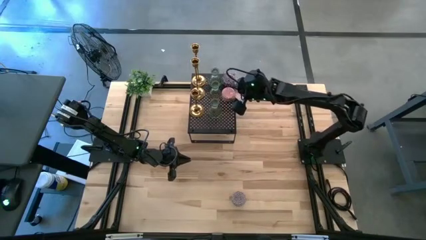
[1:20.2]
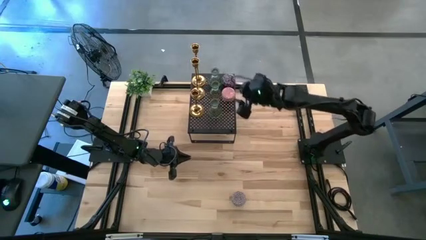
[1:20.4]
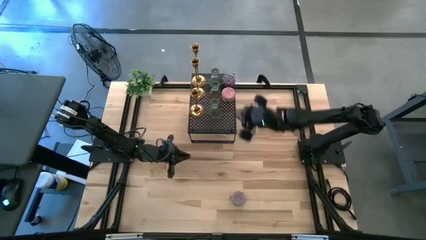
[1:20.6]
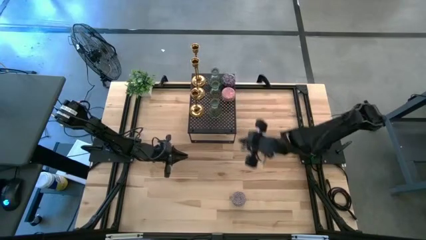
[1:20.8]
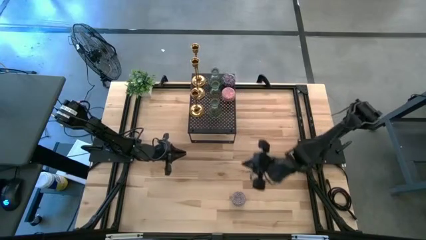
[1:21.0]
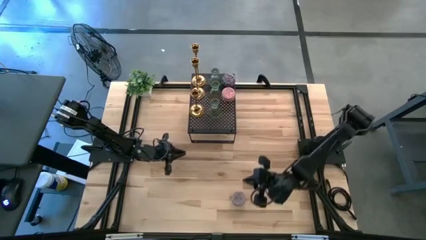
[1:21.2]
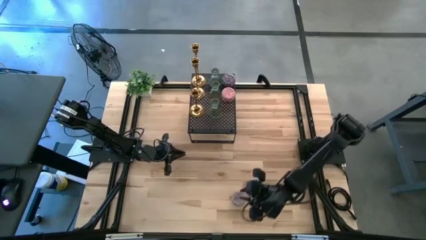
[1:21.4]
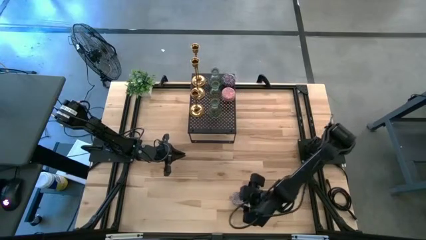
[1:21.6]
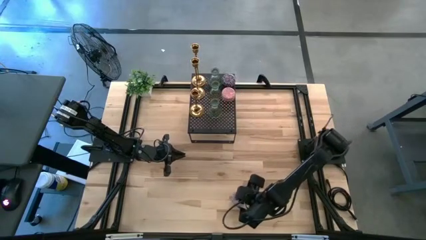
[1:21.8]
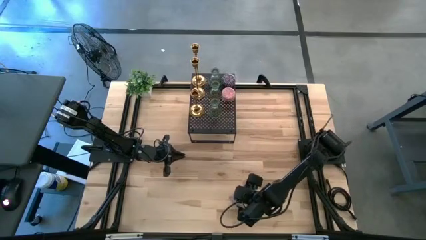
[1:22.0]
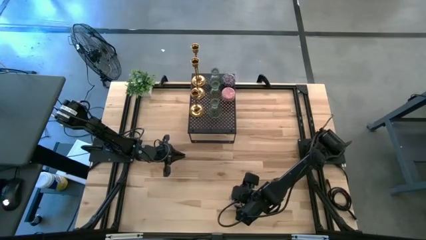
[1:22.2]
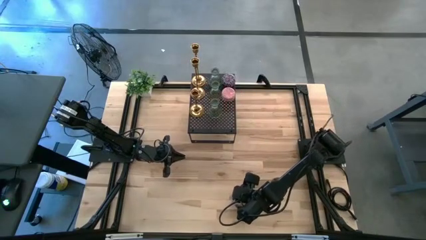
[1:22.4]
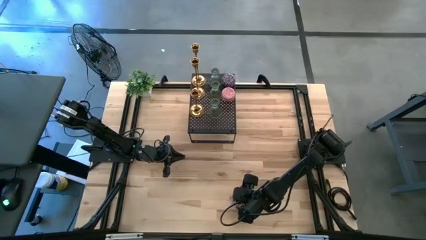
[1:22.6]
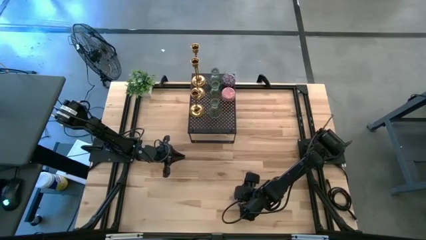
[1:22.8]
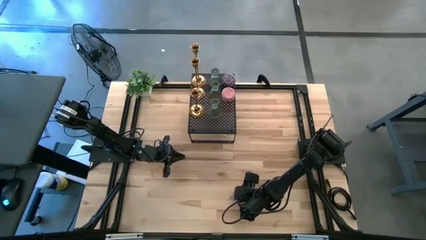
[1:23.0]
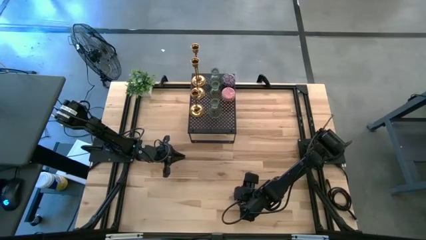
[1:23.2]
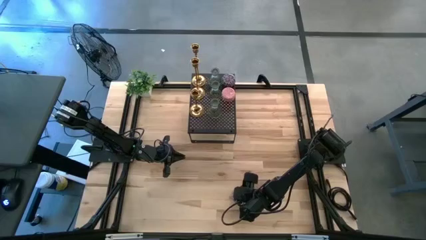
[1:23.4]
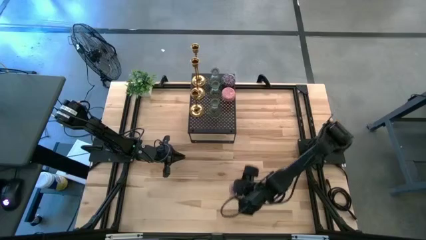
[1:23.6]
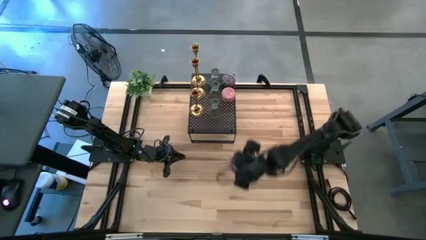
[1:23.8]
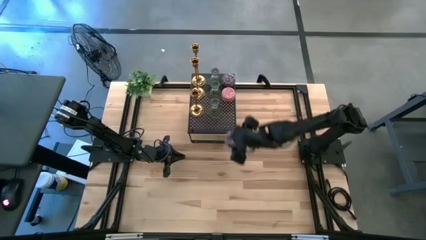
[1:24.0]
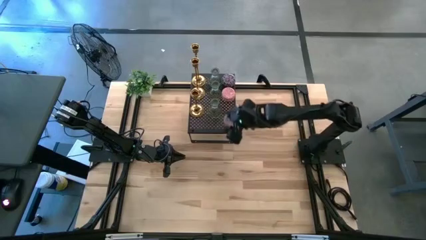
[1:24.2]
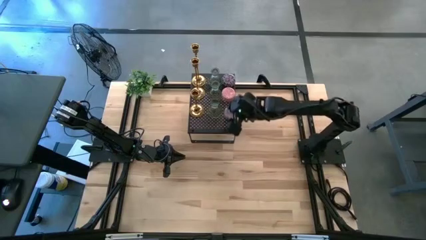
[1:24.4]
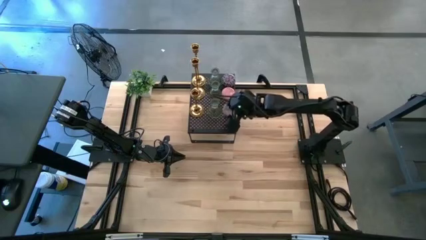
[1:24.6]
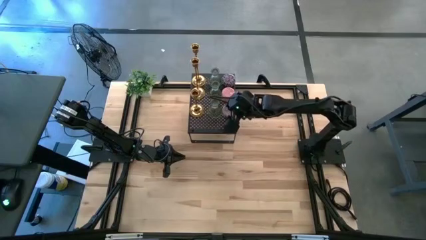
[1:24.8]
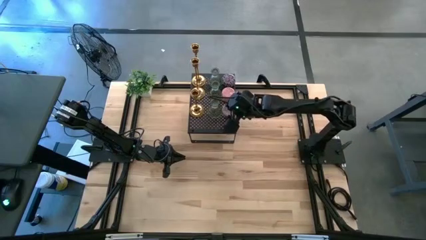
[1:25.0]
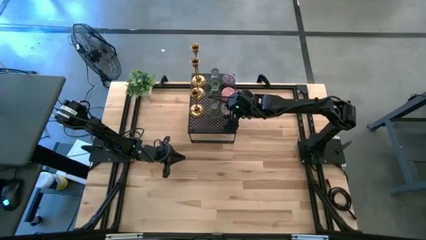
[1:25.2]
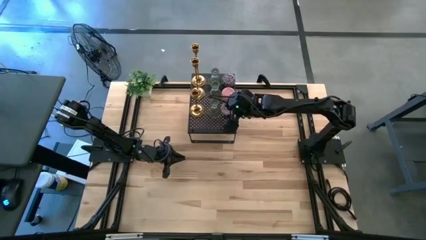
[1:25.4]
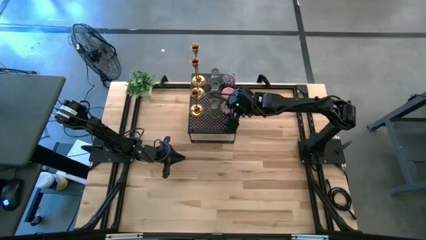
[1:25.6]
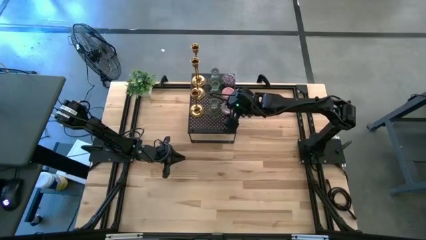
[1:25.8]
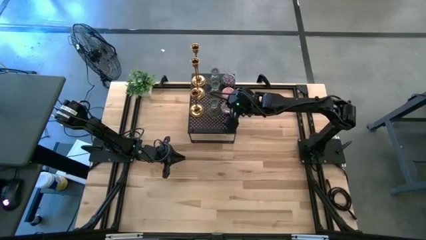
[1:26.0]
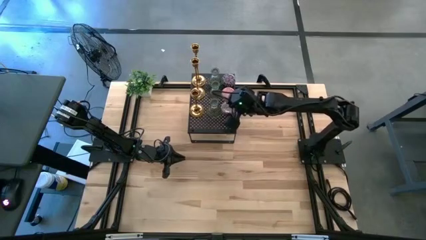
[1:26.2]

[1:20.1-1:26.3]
Task: Pick & Place candle stick holders
Put the red and white candle on the shelf aligned with the pink and white candle

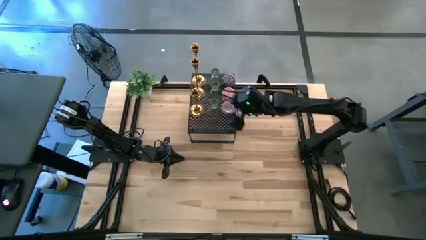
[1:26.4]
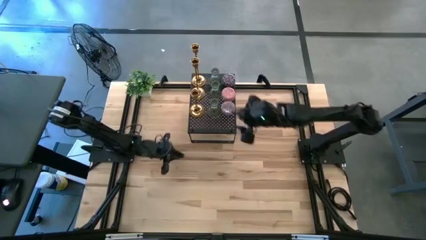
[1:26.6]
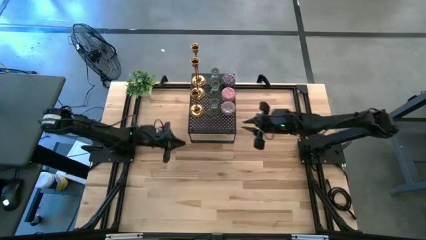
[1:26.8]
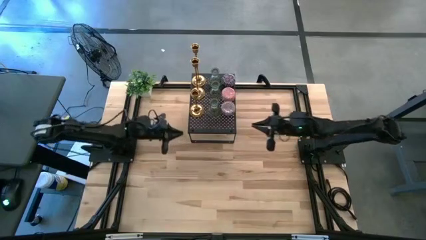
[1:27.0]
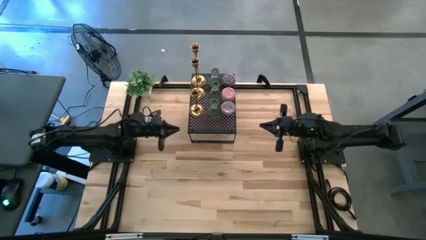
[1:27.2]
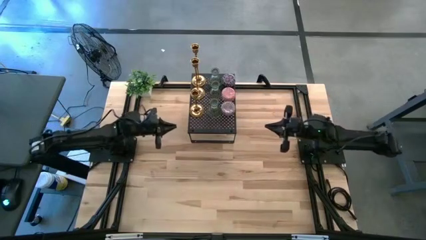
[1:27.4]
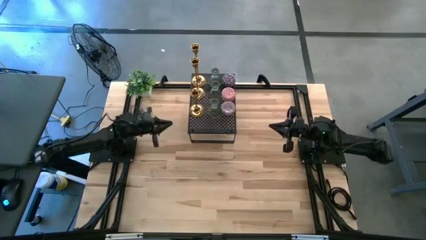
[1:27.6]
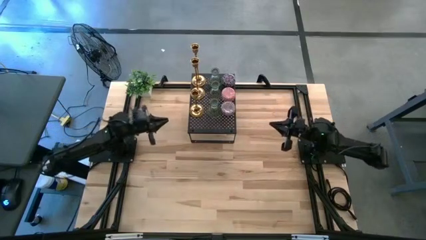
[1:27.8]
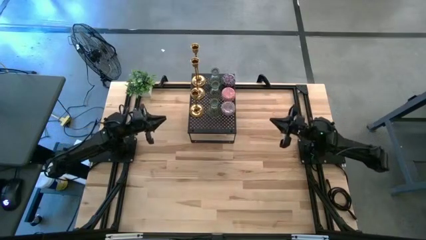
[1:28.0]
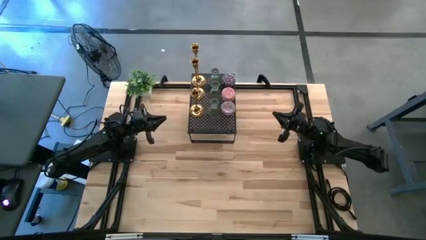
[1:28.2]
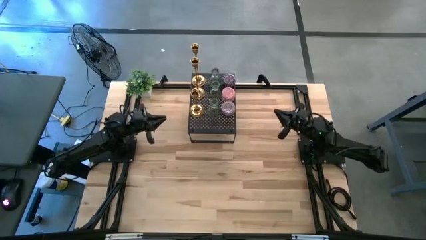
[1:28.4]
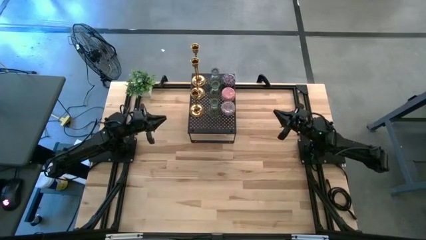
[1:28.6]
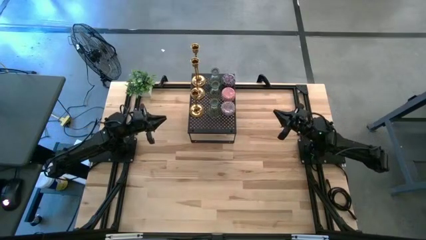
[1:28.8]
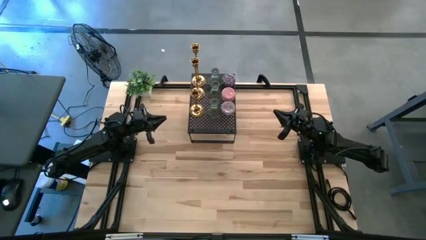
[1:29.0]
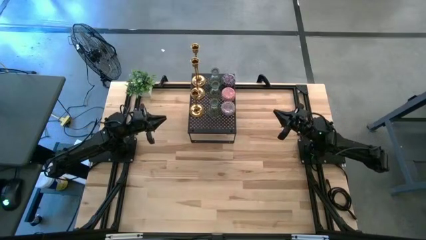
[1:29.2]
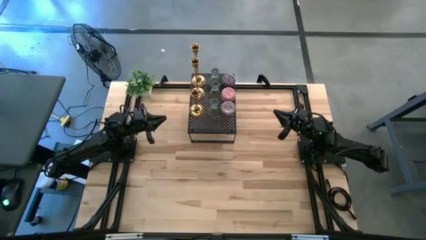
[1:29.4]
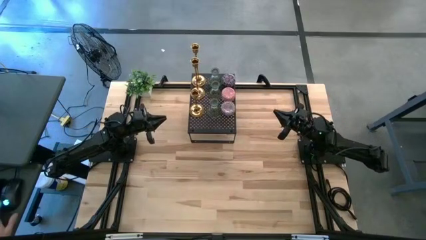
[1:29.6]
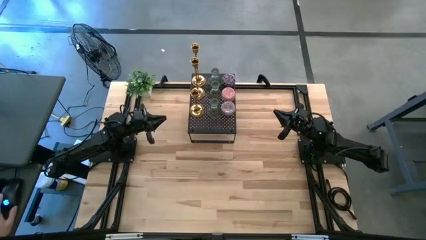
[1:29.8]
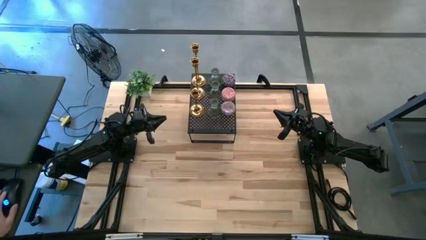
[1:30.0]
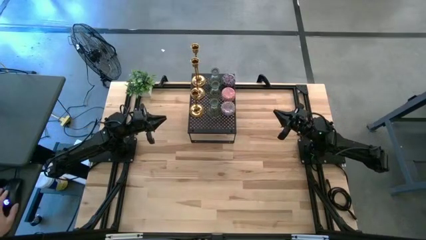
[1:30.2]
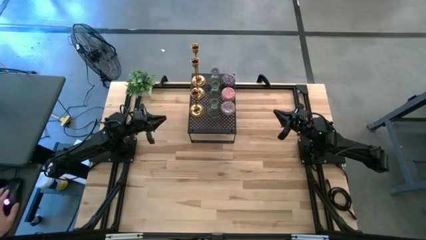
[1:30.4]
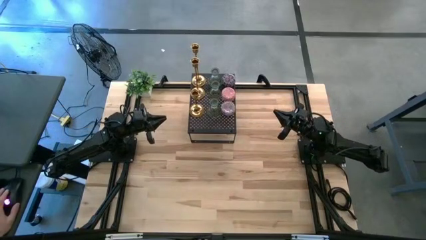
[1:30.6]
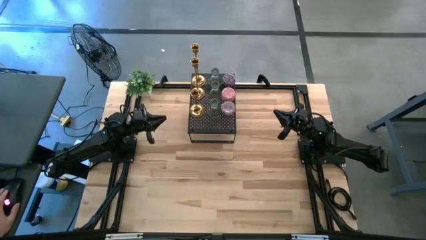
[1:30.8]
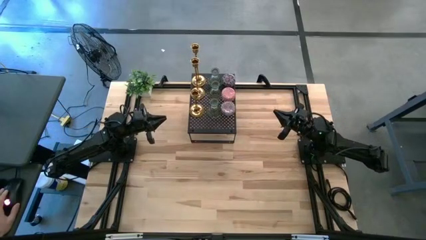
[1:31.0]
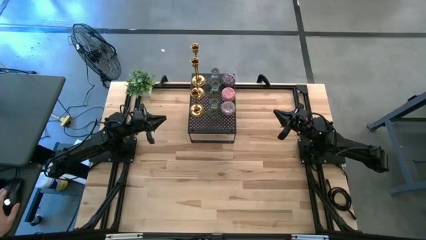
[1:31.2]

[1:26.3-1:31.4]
Return to Home Position

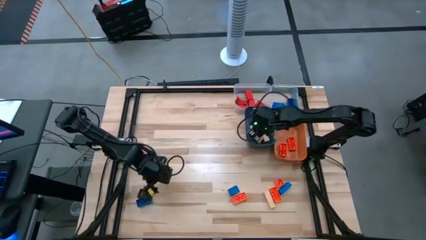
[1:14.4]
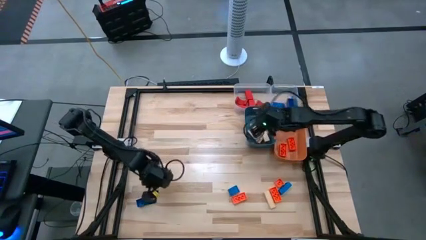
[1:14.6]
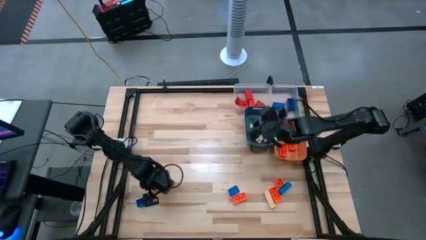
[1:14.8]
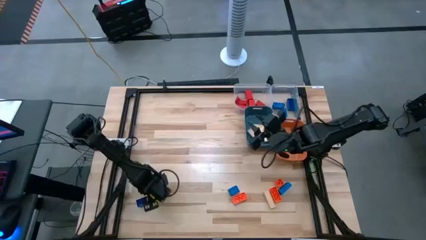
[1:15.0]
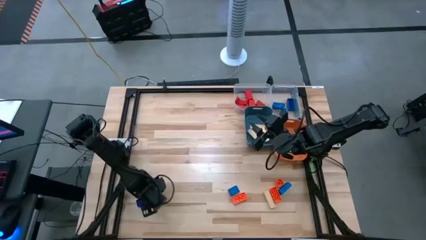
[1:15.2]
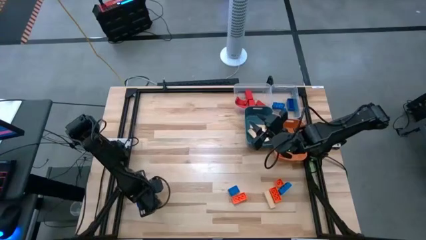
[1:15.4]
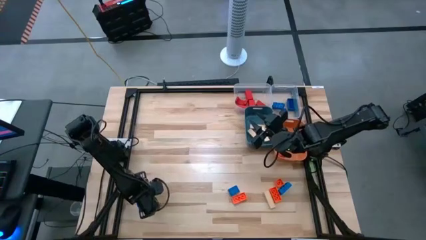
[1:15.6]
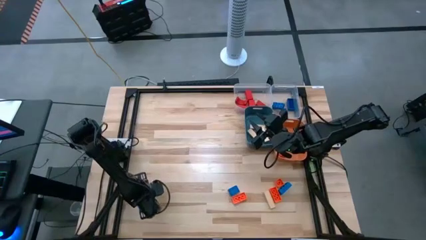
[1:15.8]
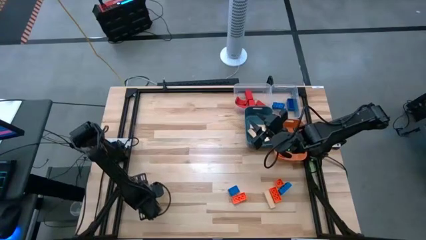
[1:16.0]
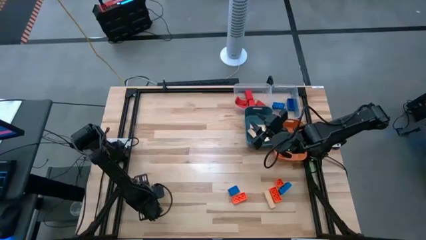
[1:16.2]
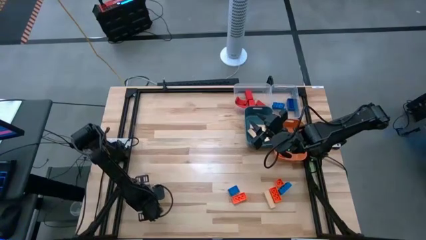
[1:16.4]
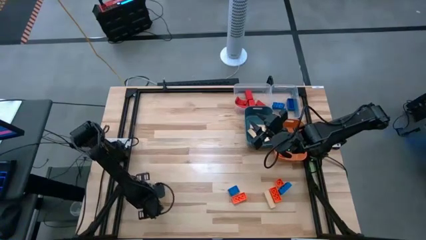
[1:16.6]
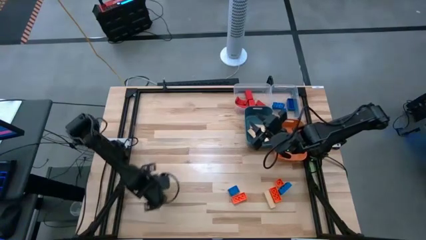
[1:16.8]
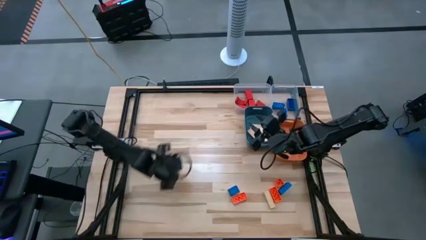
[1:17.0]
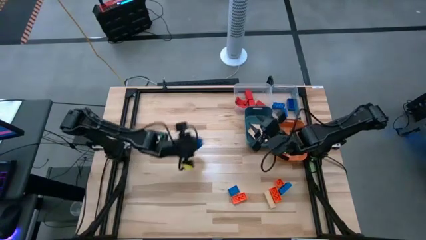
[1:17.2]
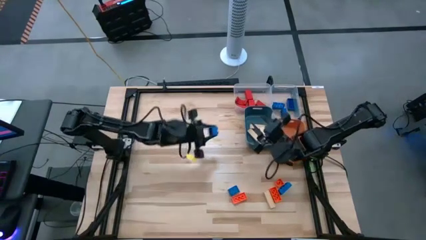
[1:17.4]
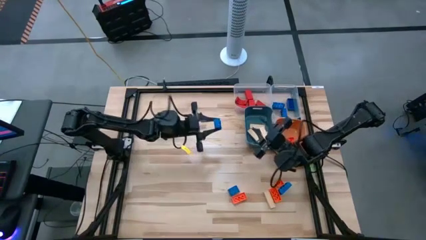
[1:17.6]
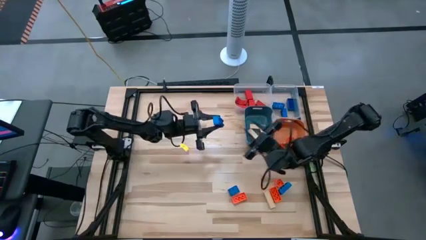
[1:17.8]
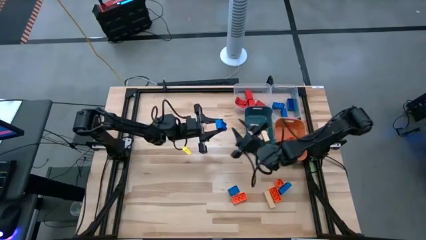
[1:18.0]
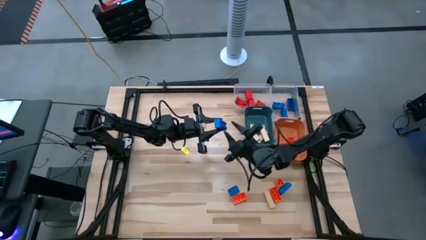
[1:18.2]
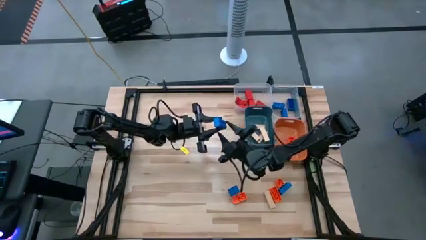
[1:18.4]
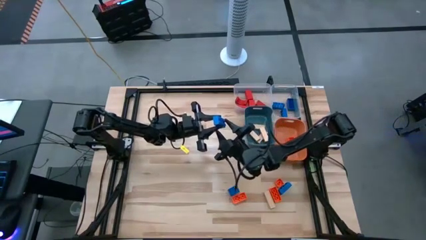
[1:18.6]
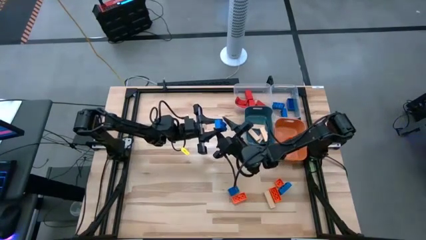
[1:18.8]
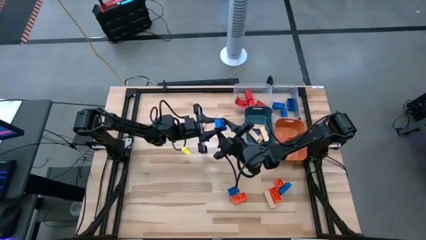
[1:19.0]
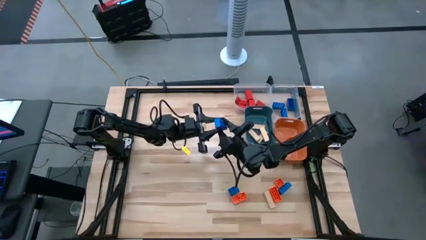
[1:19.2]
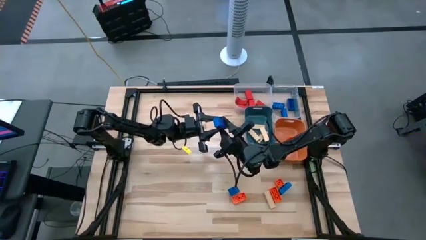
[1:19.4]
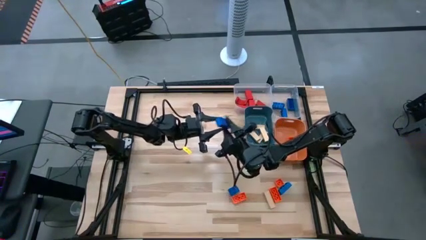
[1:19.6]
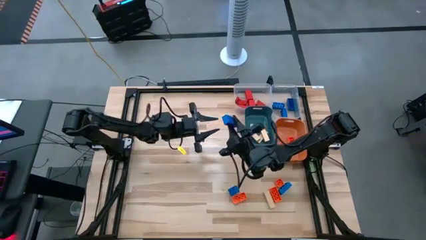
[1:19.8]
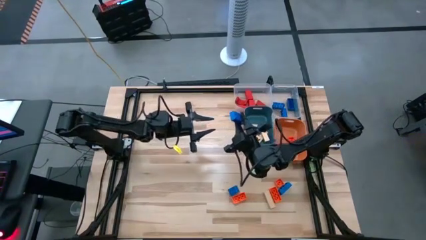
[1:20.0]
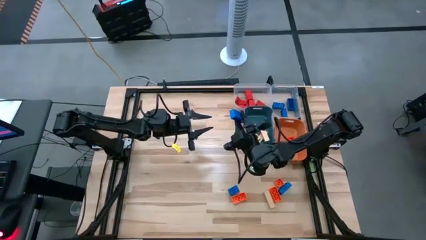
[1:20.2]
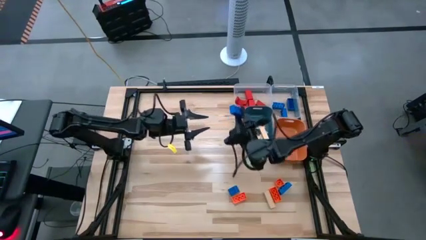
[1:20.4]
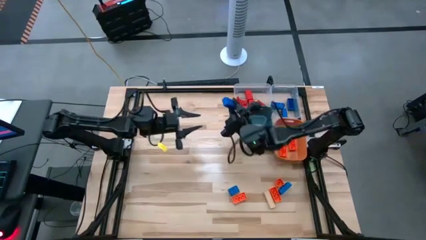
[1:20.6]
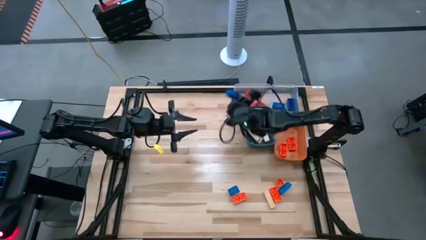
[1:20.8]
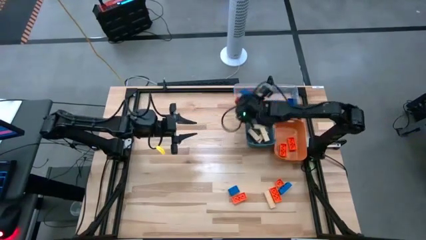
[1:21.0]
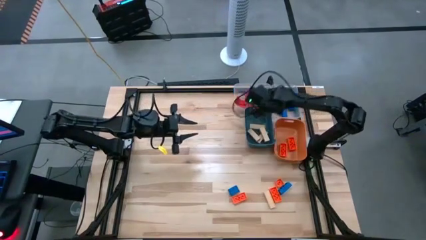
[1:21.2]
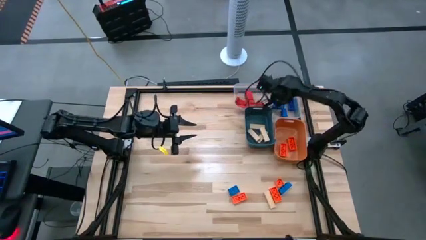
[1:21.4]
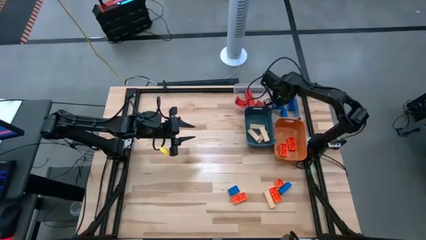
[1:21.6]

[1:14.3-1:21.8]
Task: Sort blocks
Put the 8 stud blue game piece into the right transparent bin
